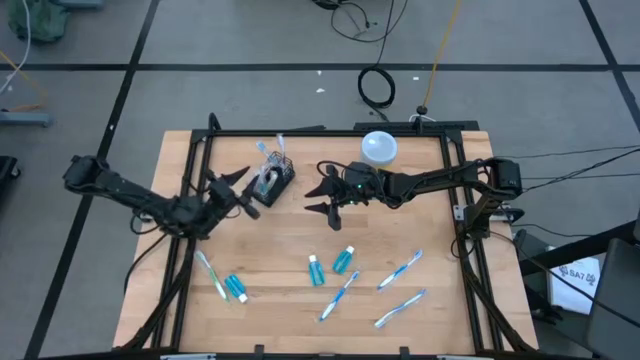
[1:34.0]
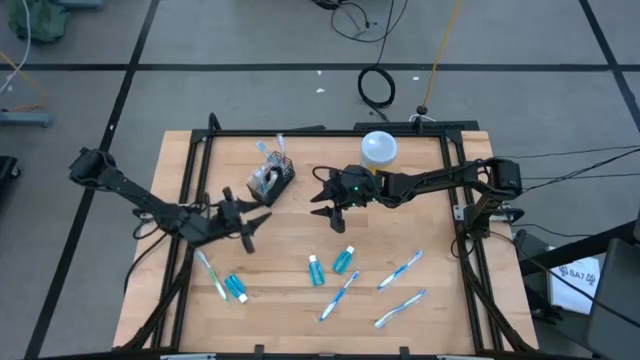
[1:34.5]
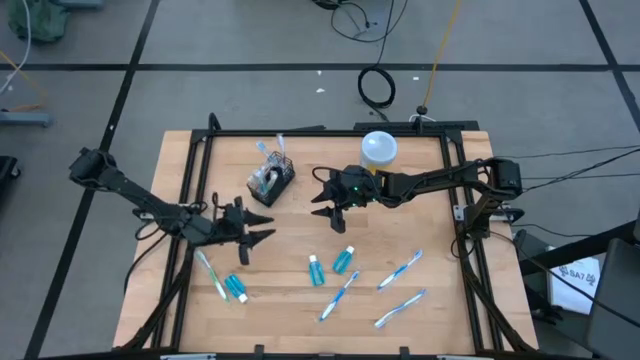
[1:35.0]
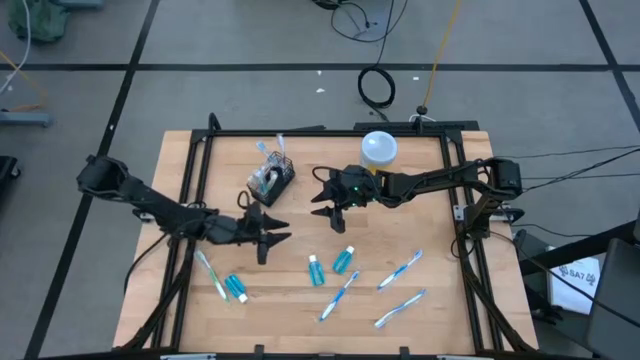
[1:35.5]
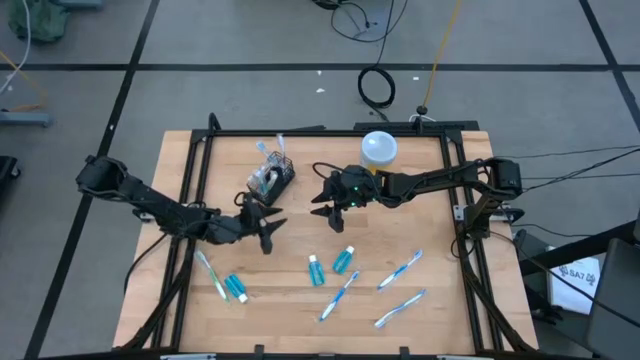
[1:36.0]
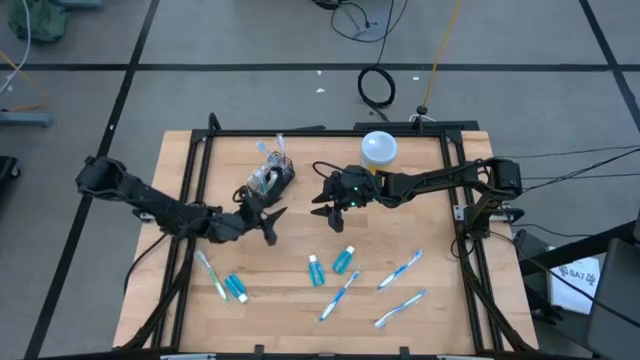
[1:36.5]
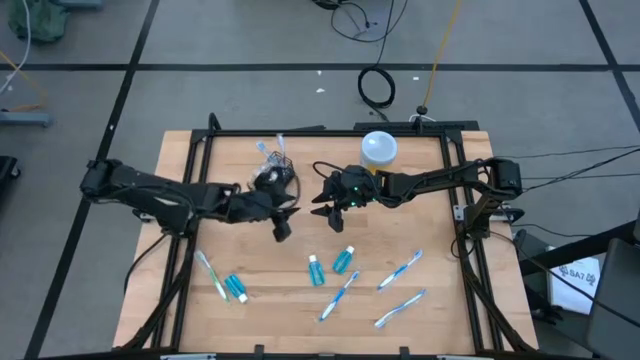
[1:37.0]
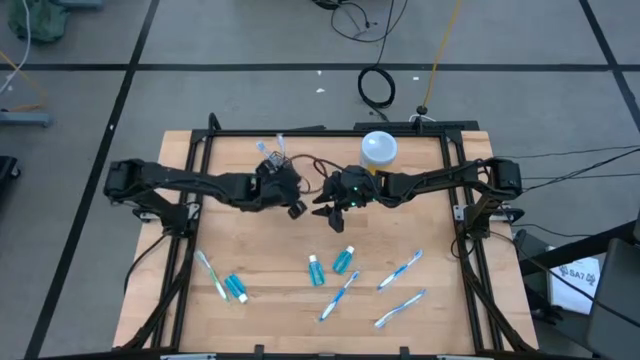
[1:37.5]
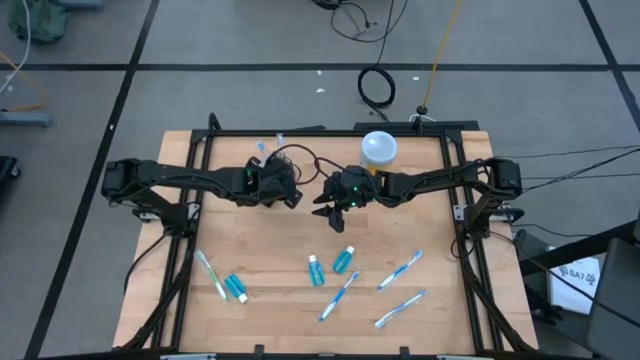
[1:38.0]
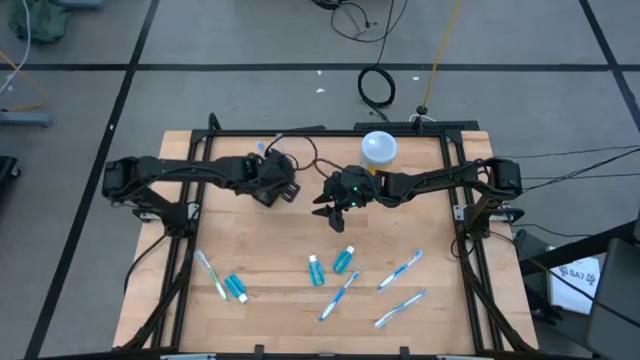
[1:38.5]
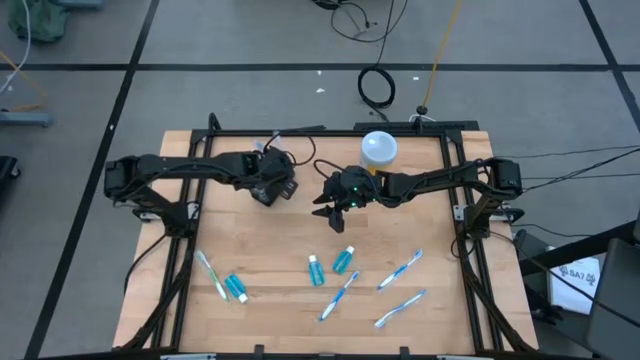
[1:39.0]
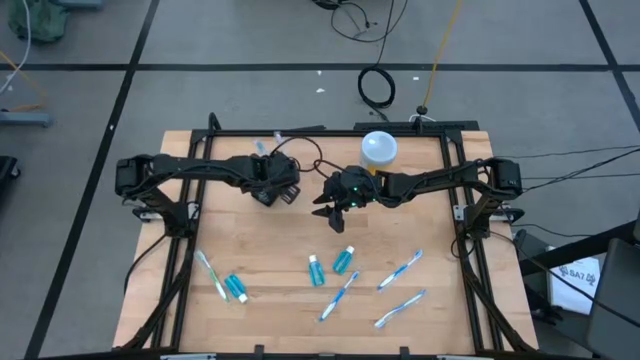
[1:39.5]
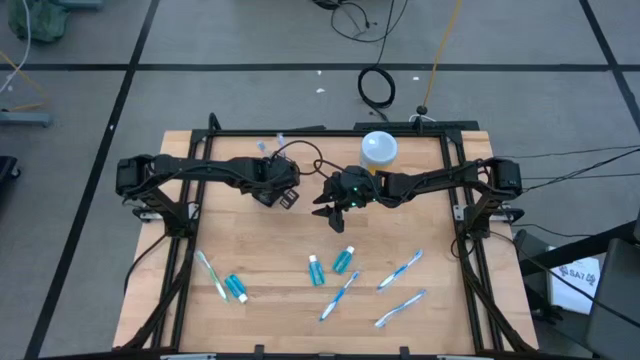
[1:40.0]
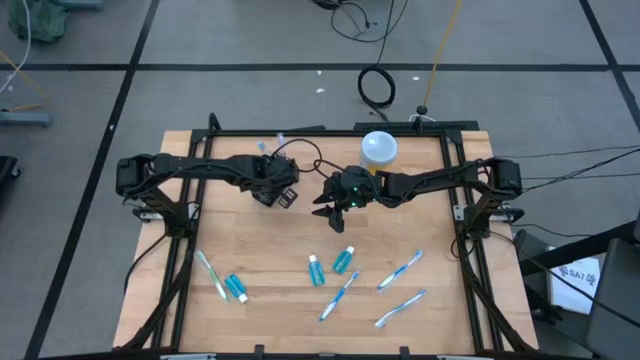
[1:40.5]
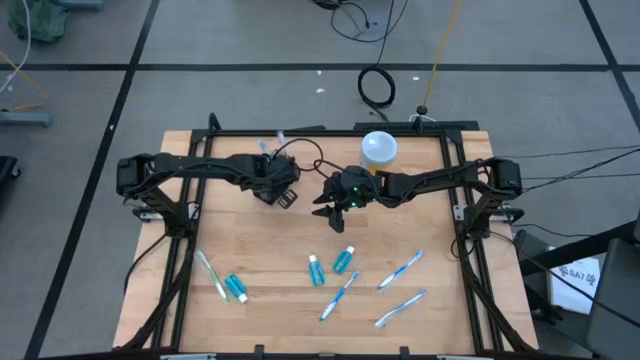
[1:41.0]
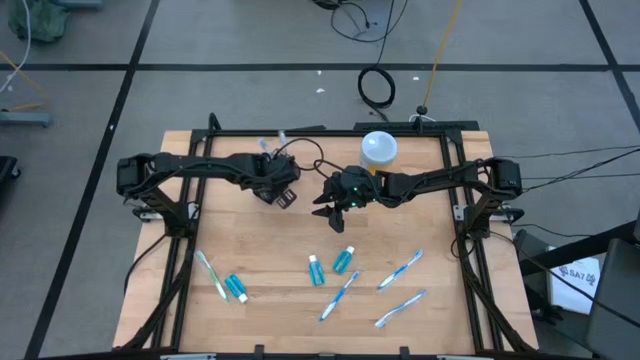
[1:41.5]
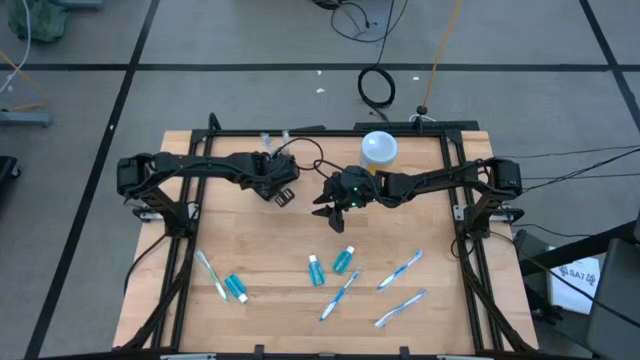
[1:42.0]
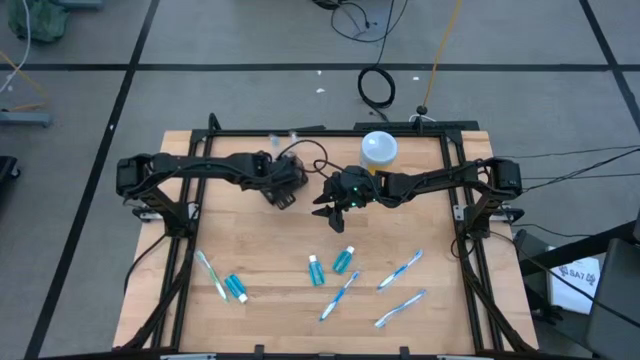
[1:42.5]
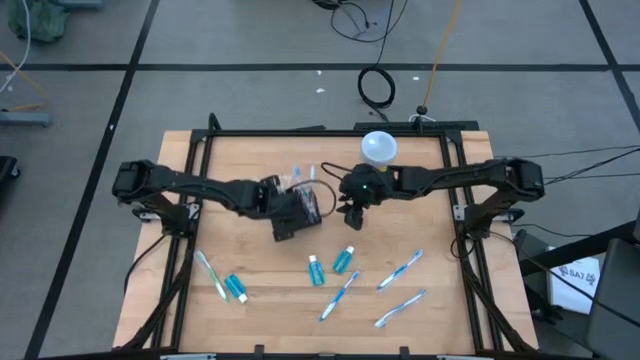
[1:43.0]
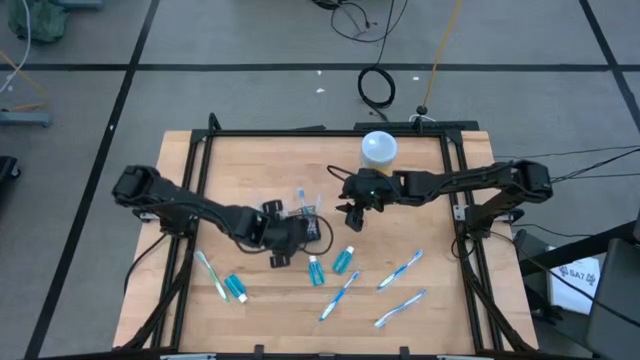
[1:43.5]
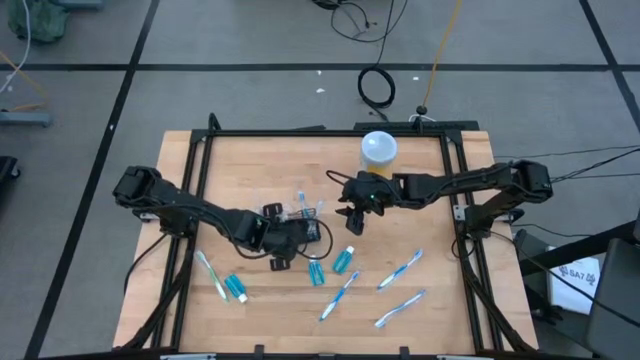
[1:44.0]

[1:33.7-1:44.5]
Task: Pick & Place toothbrushing station
Move the black wire organizer from top to the center of the table

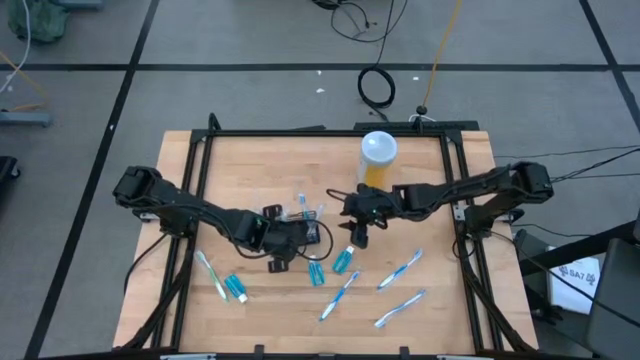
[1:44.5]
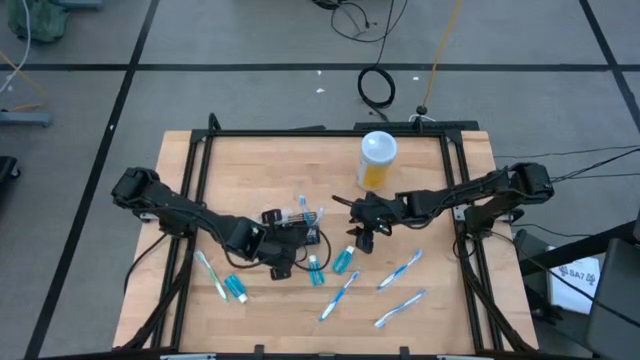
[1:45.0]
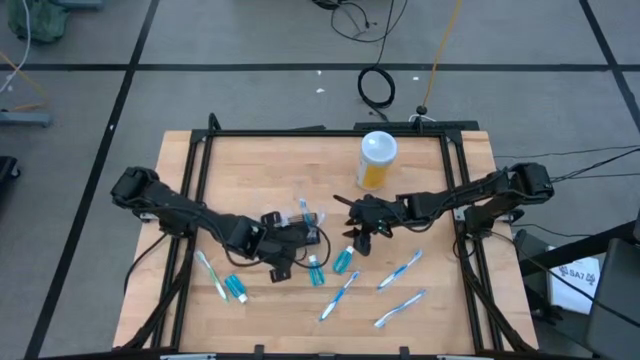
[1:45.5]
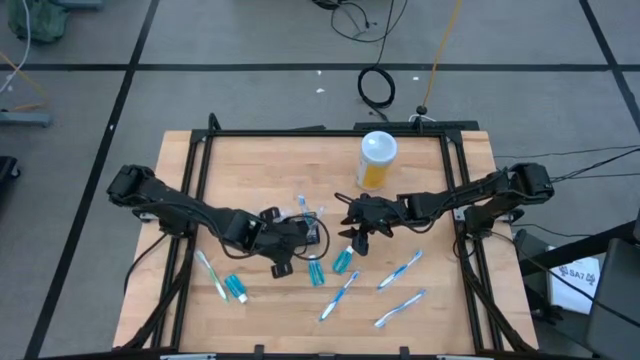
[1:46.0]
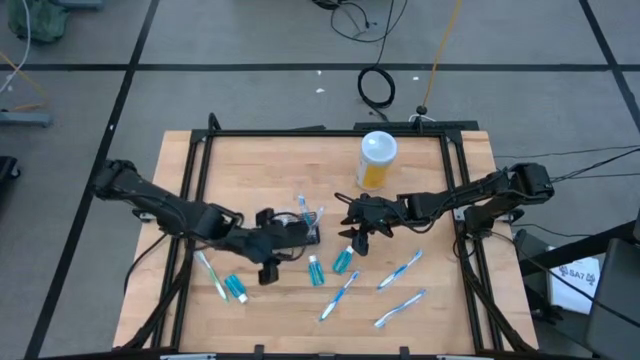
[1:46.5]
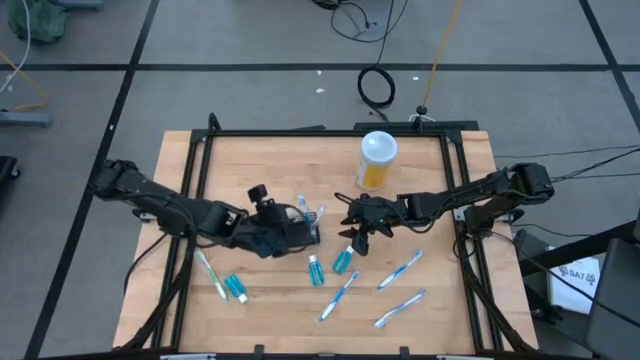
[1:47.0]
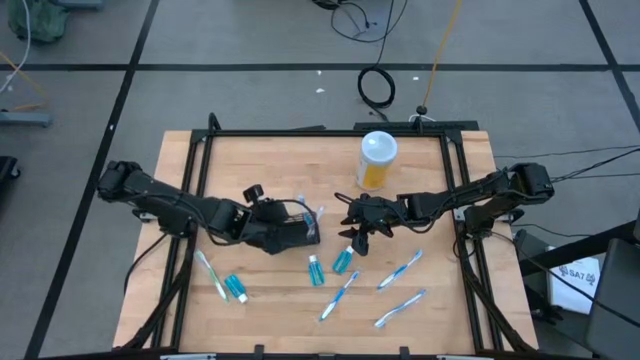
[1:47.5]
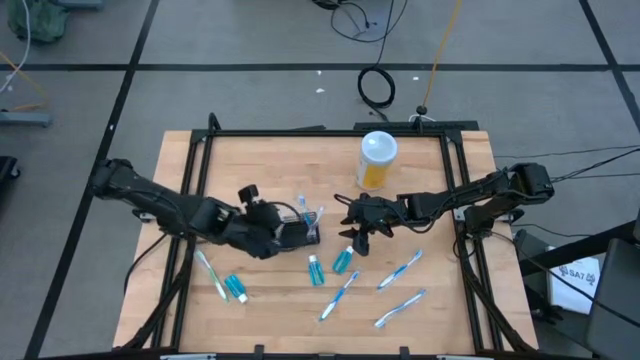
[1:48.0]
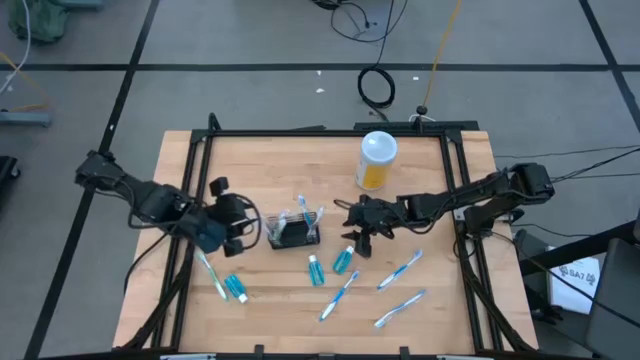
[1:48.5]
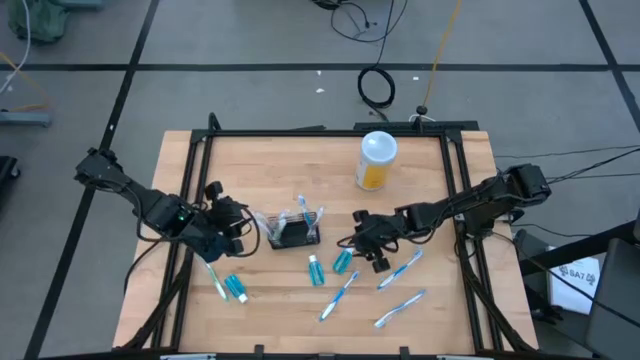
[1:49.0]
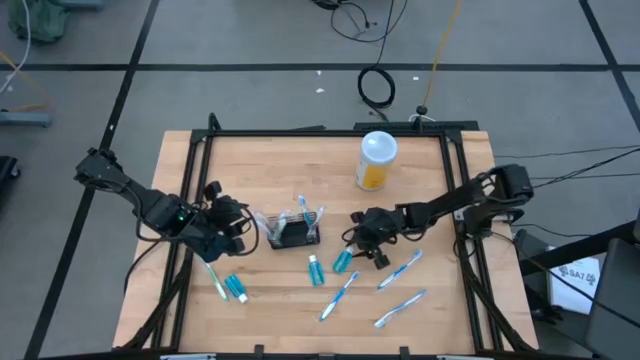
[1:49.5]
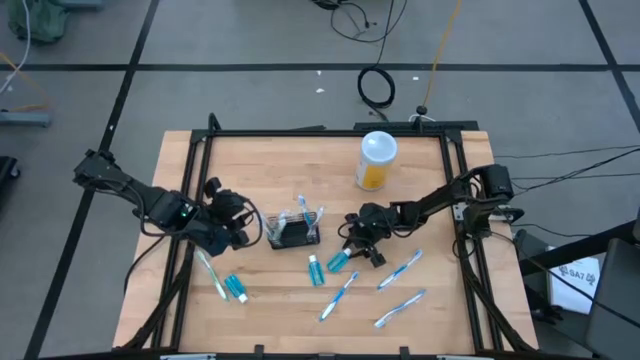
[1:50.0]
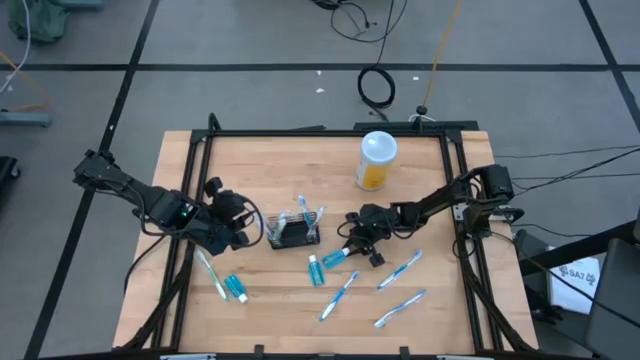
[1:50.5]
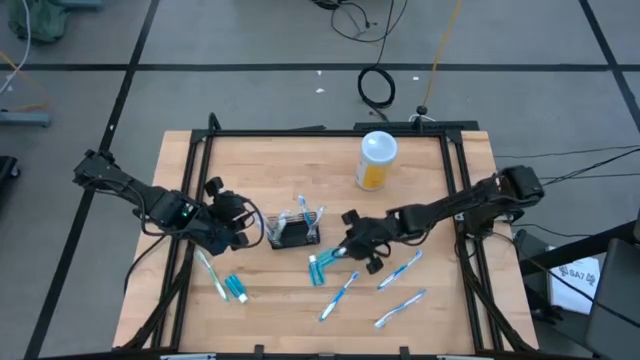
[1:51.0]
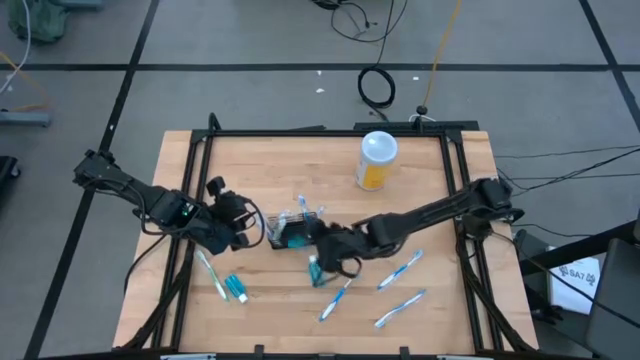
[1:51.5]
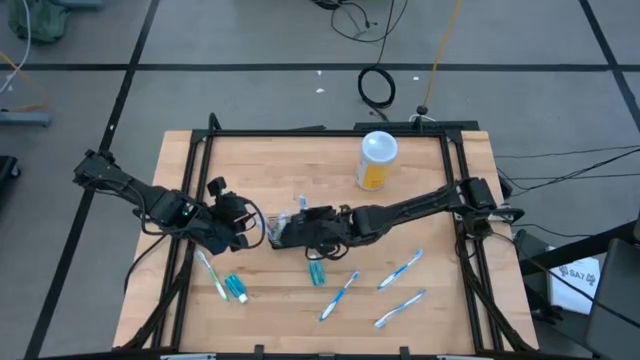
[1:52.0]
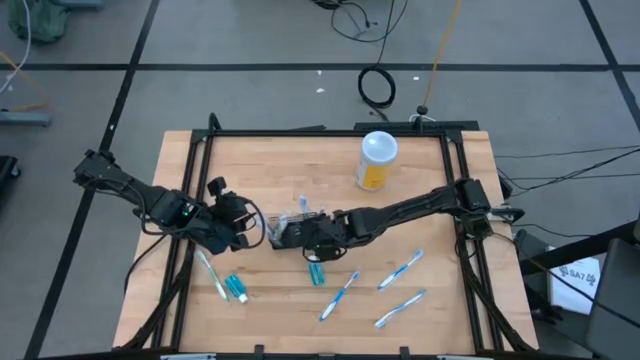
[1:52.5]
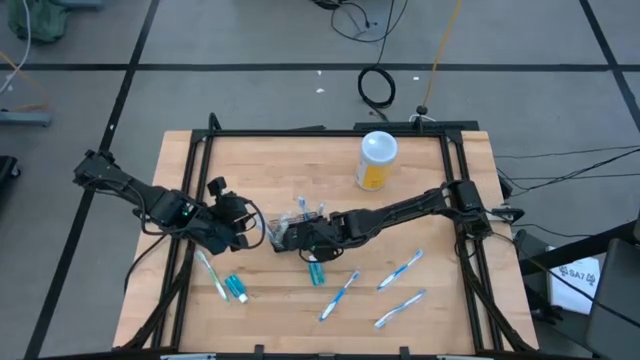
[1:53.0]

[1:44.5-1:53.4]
Put the top right mouthwash bottle into the black wire organizer

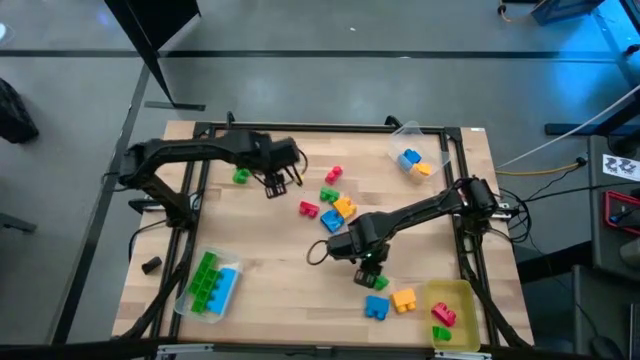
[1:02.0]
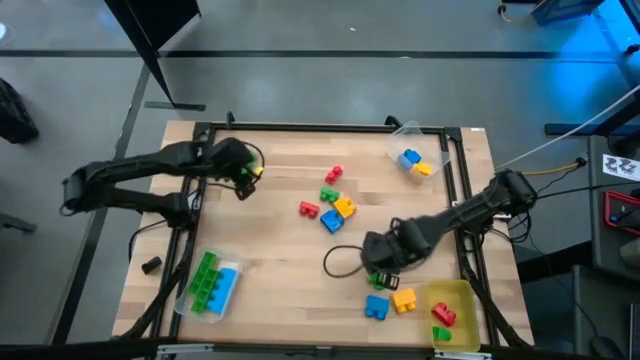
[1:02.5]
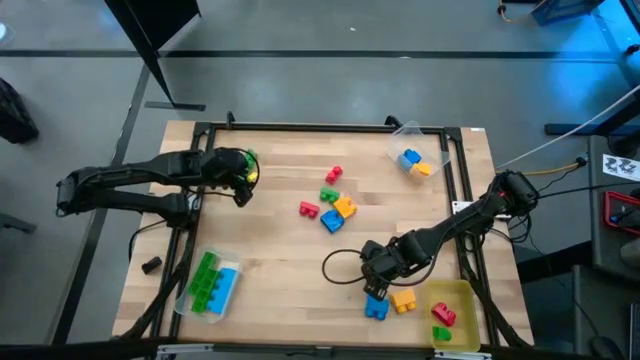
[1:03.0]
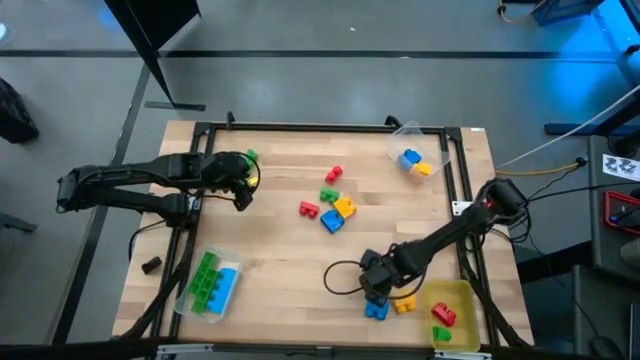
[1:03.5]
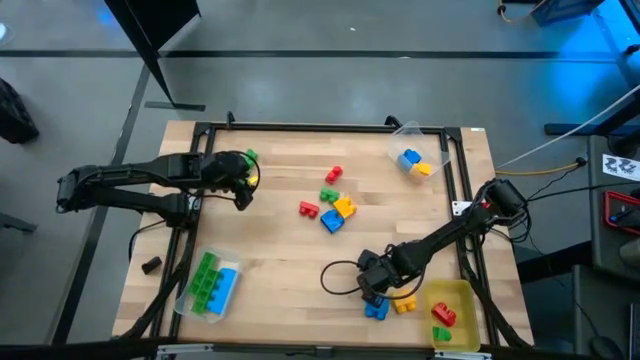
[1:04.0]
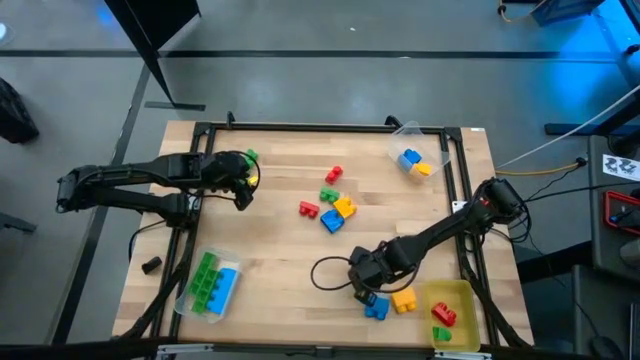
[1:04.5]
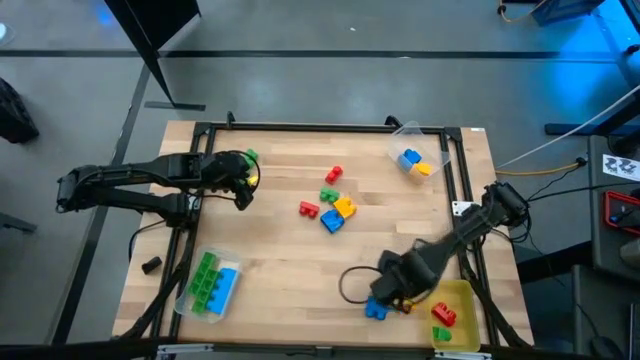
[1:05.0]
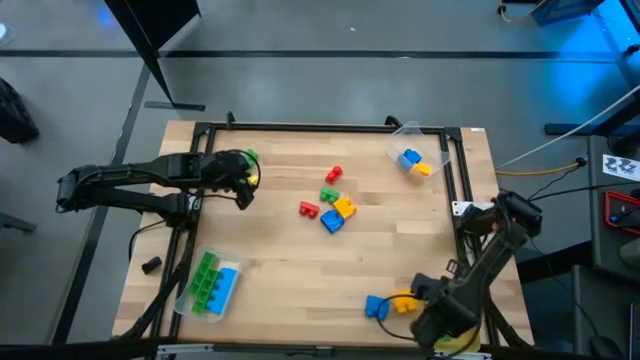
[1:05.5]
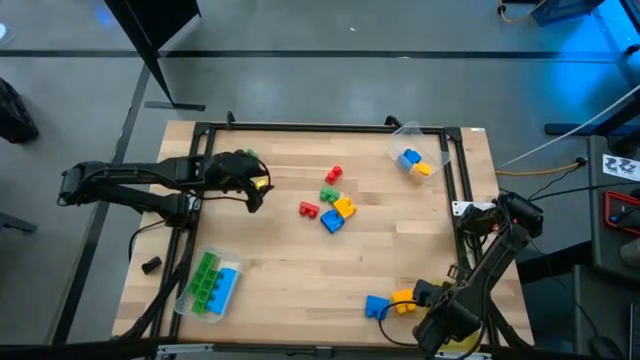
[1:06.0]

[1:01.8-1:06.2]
Task: Sort blocks by size
Put the bottom 2 stud green game piece into the yellow transparent bin
